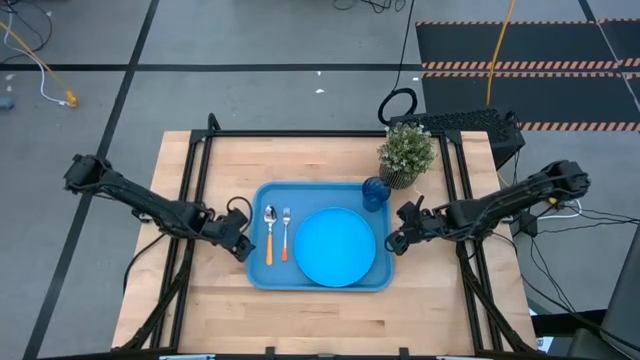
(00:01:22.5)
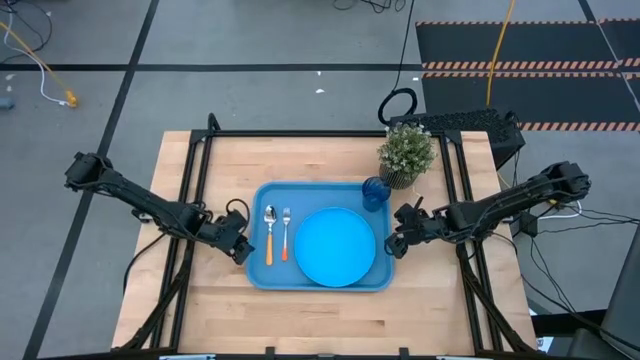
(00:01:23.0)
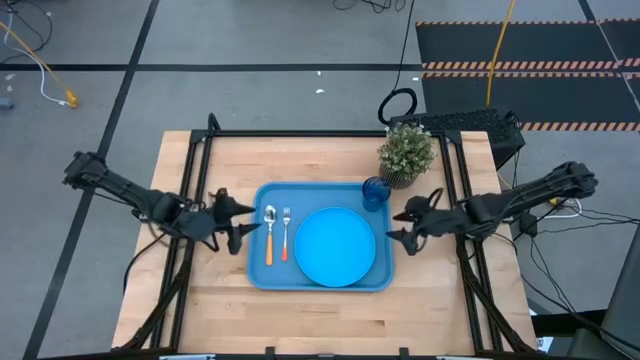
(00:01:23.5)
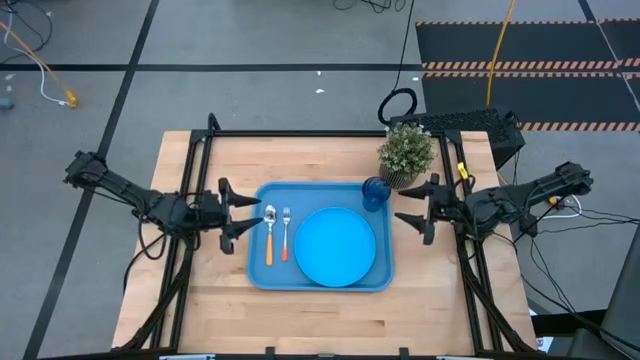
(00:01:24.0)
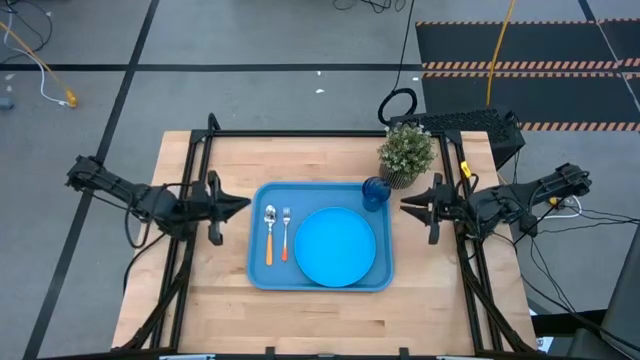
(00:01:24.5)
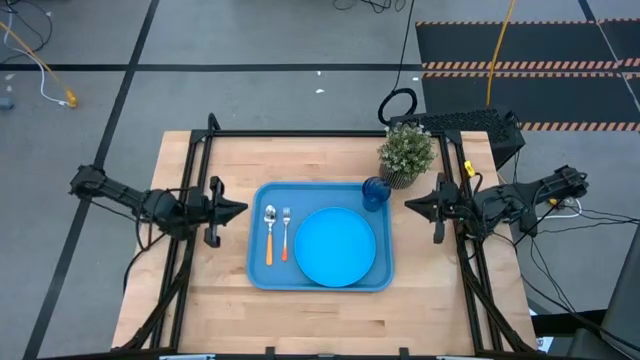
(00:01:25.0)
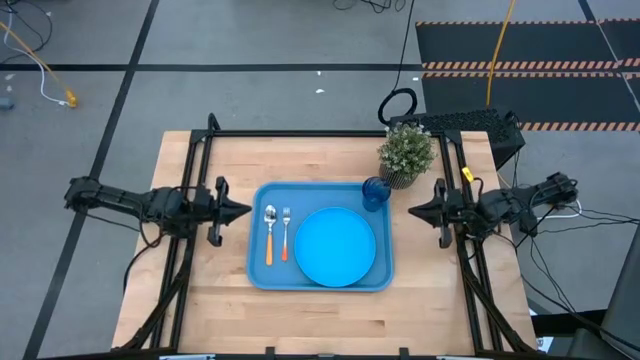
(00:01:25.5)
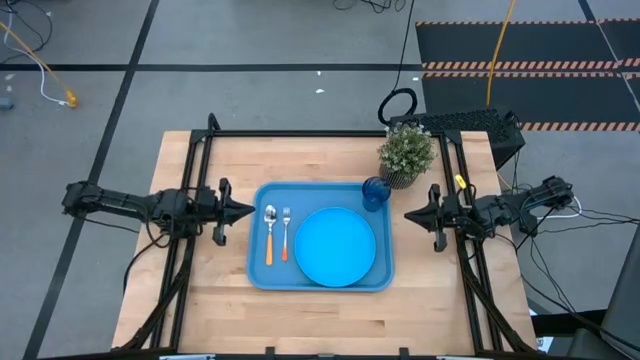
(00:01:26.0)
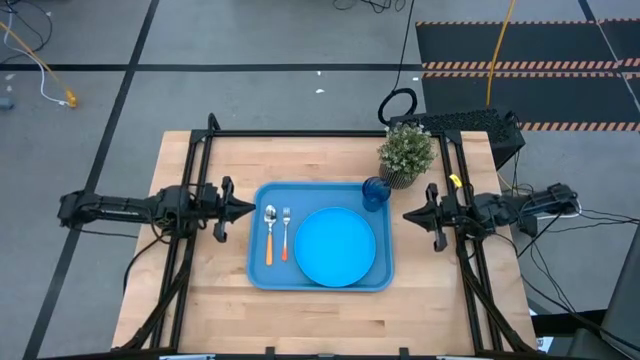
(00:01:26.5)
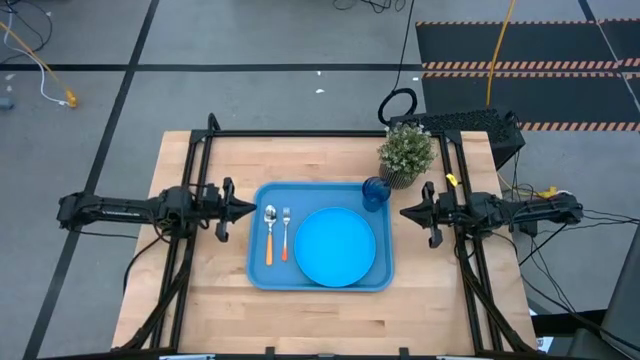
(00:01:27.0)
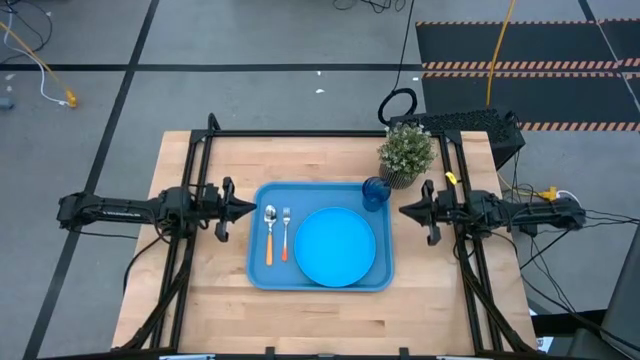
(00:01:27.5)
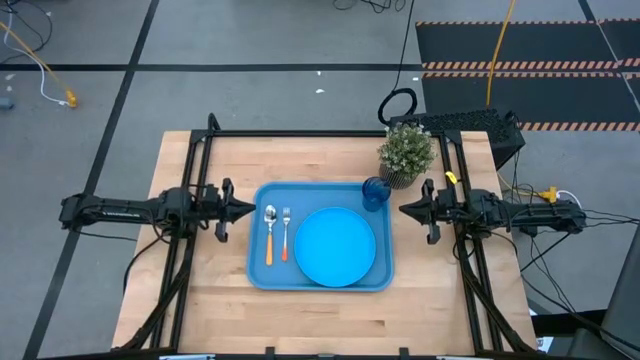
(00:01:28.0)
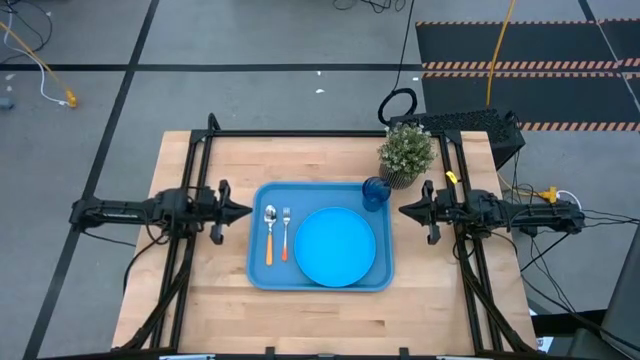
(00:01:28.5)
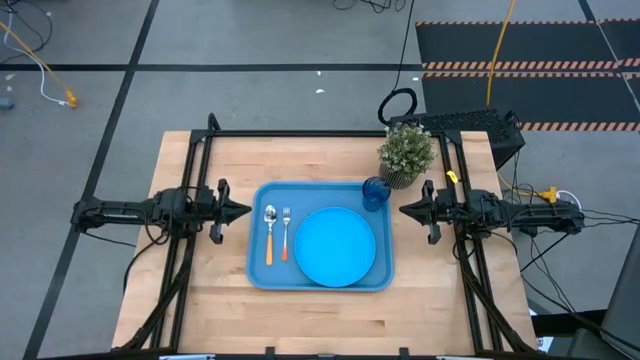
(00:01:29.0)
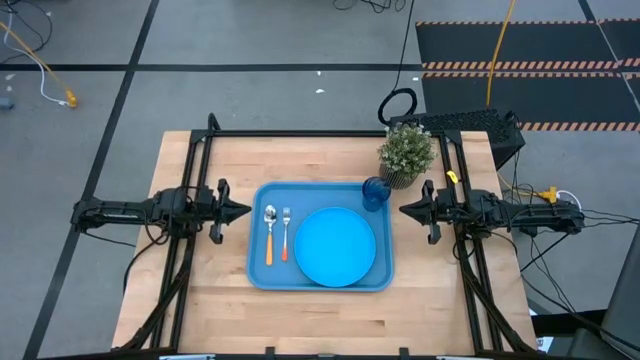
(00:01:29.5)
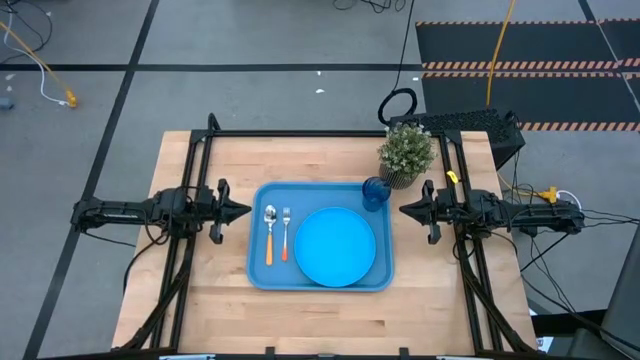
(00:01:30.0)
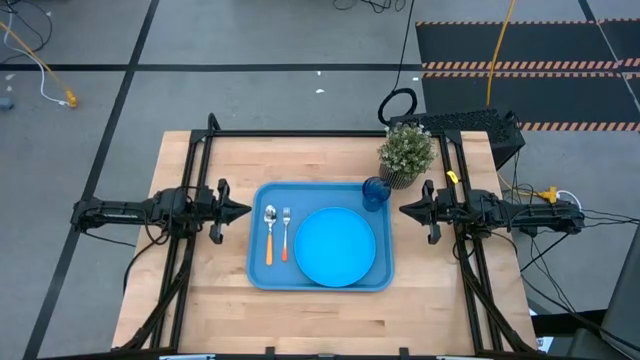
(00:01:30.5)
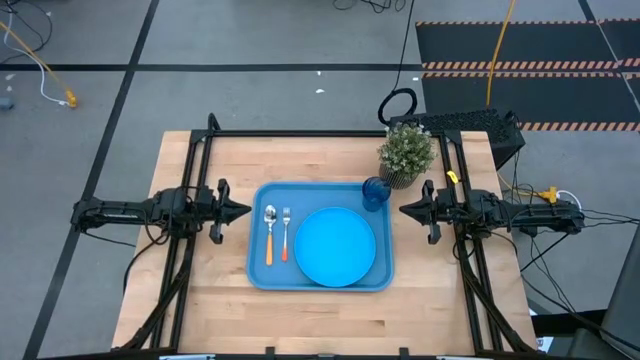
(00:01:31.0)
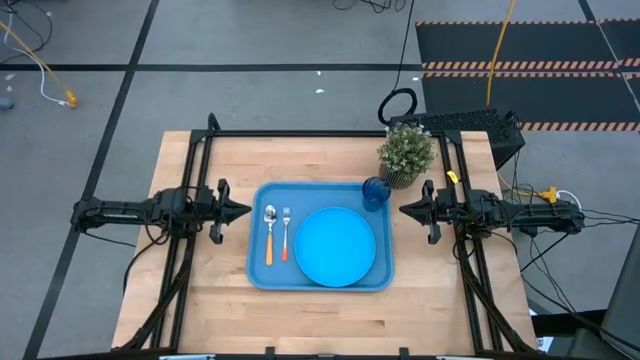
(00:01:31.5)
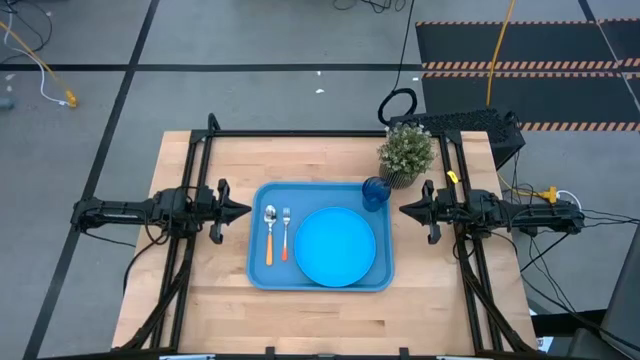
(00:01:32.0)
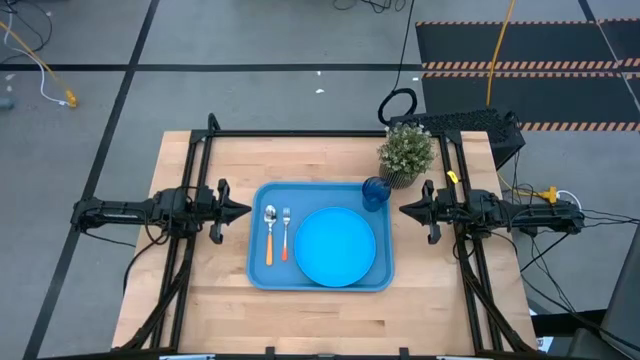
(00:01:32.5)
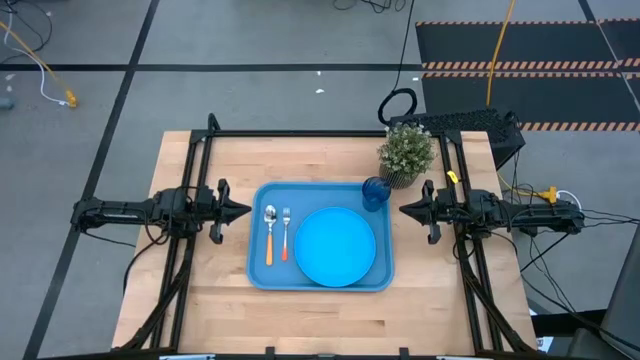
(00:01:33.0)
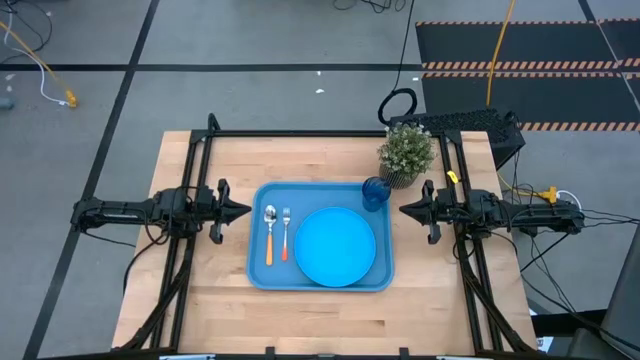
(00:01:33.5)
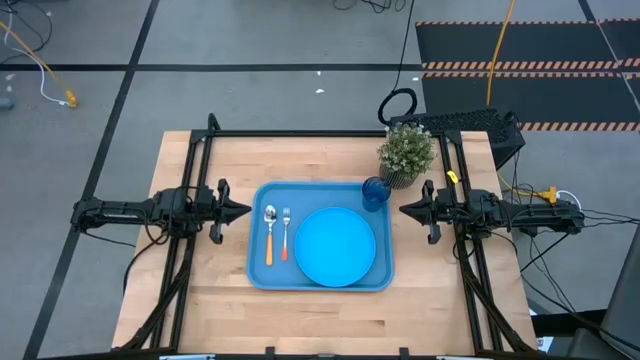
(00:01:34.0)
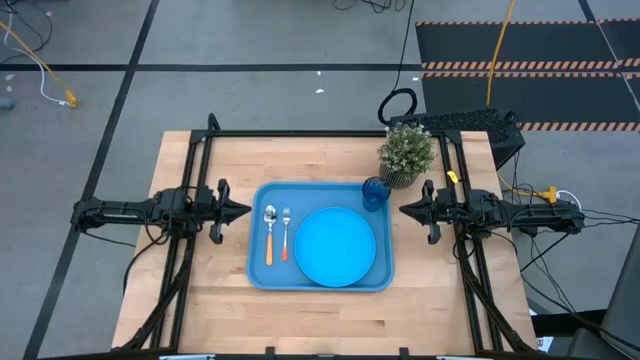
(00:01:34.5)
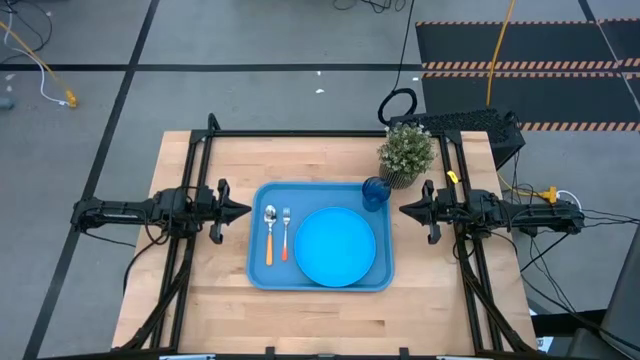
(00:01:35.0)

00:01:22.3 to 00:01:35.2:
Task: Pick and place plate/cup/fork/spoon on tray
Return to Home Position

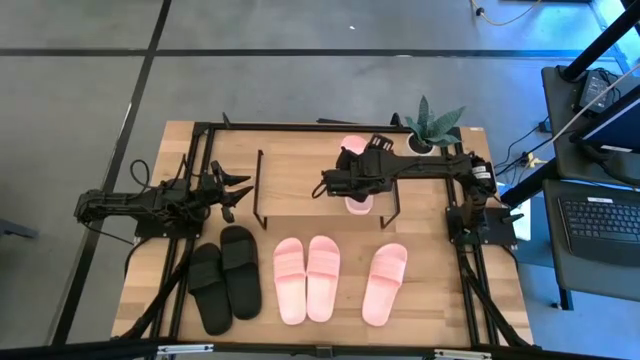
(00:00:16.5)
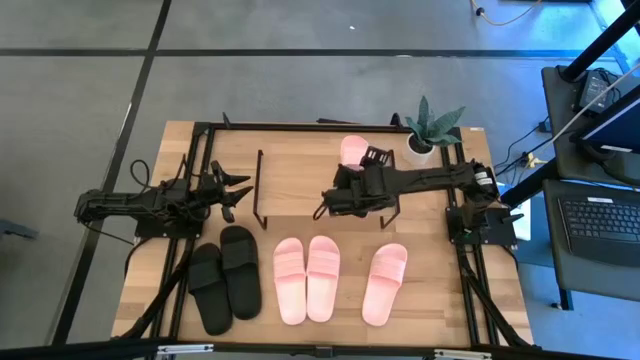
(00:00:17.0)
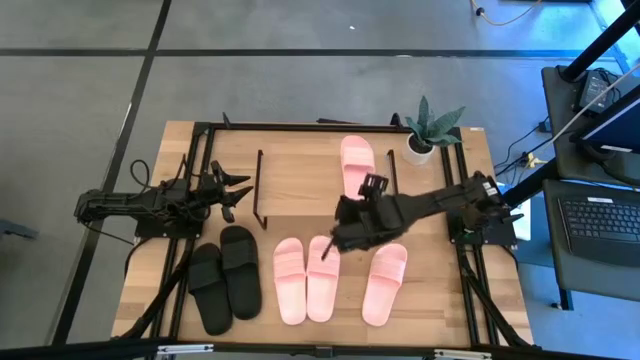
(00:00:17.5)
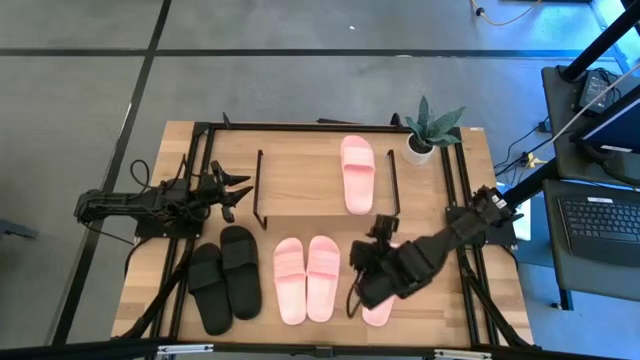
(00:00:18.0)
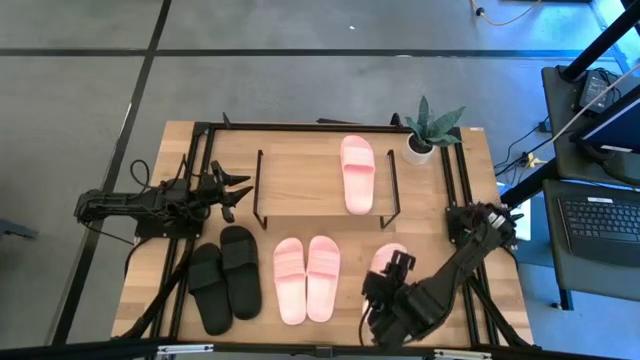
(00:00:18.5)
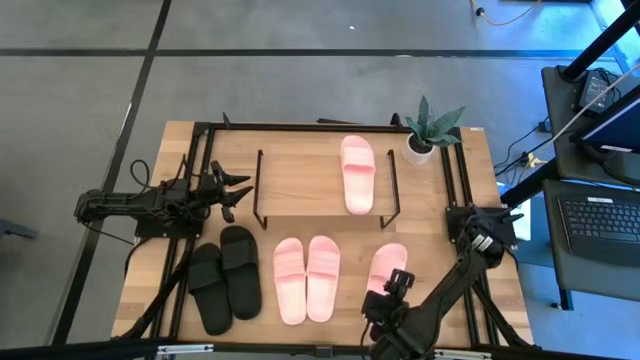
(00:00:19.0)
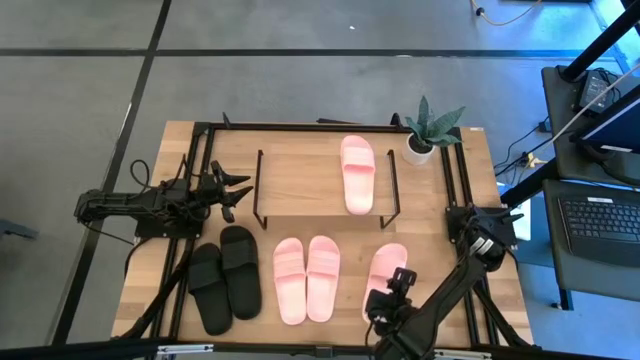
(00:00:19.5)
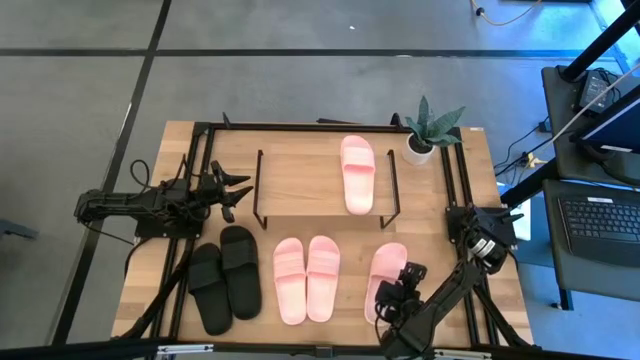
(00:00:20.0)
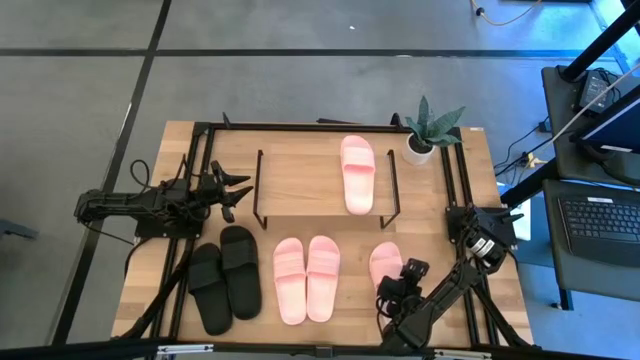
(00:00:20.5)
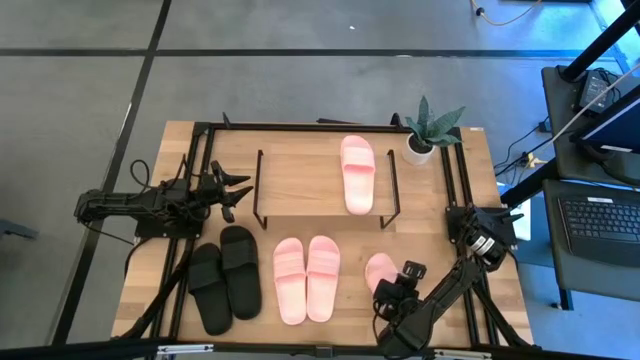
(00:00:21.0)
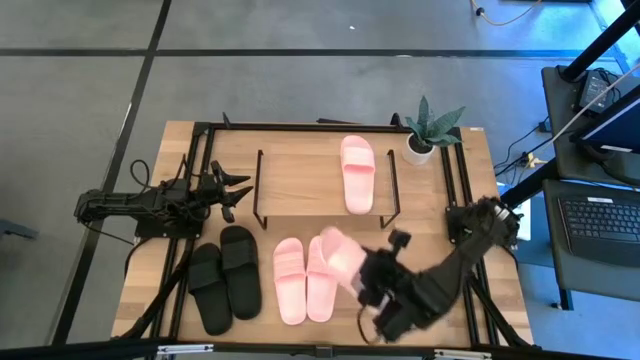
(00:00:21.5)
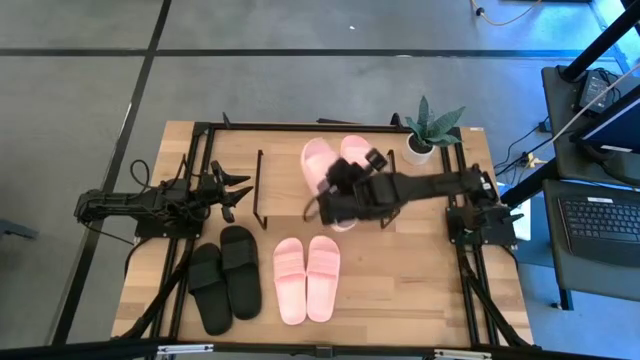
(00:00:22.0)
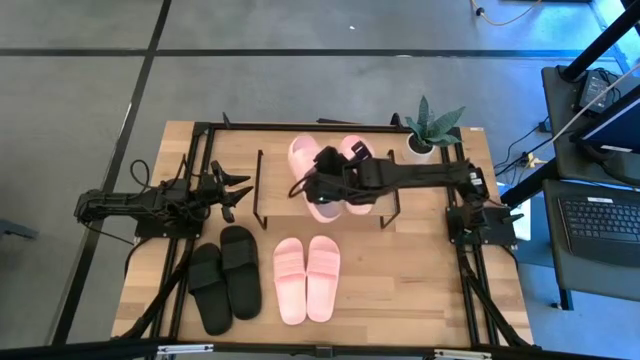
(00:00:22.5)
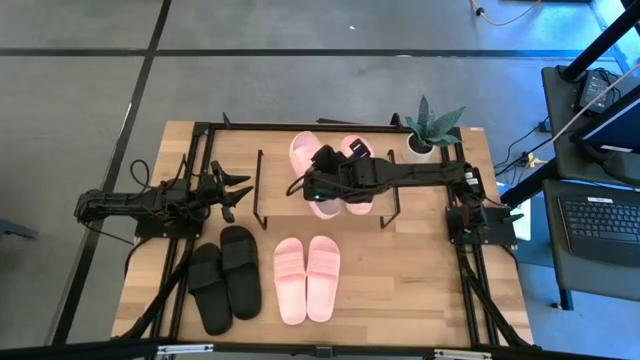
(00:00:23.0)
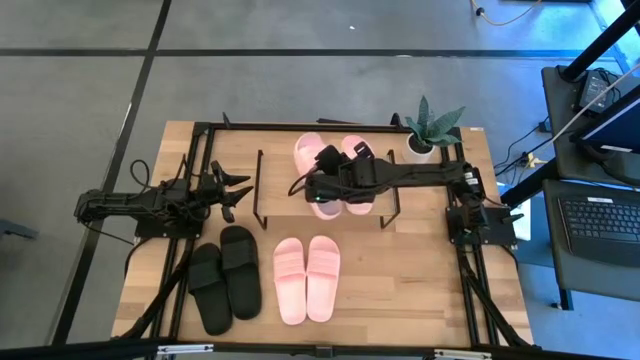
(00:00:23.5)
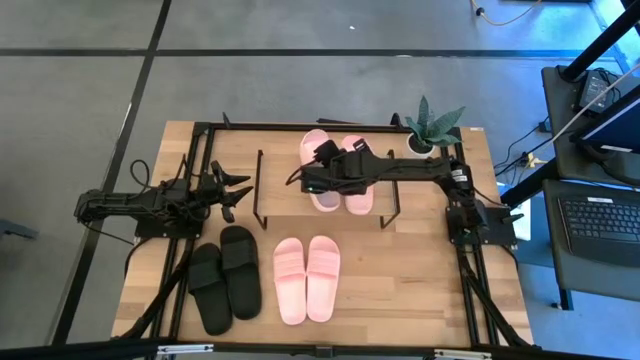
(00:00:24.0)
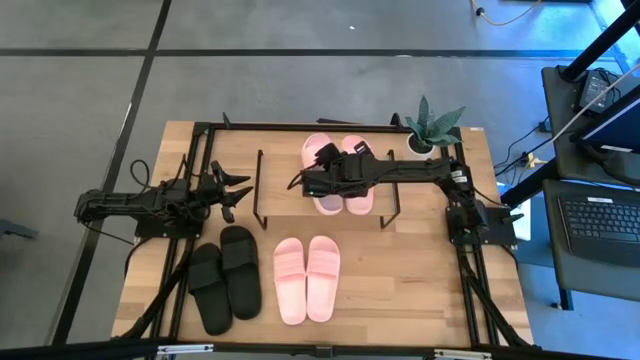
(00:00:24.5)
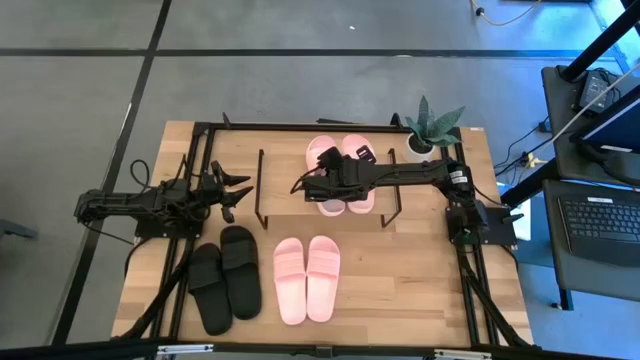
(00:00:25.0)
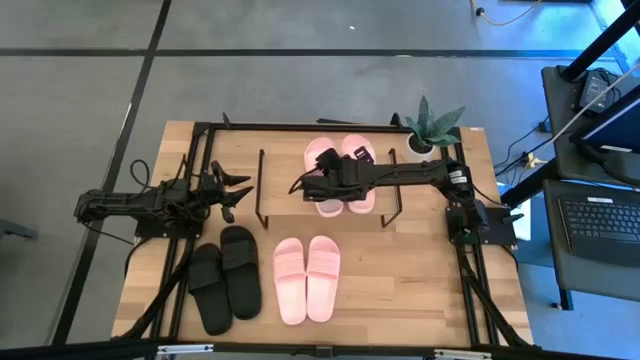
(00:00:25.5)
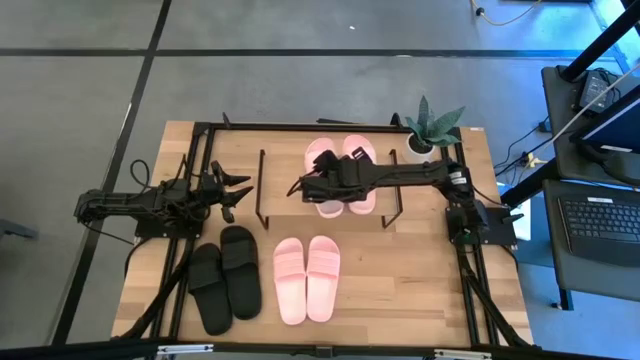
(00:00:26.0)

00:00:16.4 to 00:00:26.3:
Task: Pick and place slides into the shelf
Put the pink slipper on the shelf
